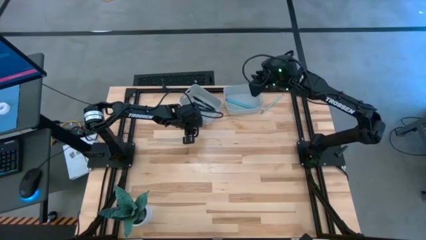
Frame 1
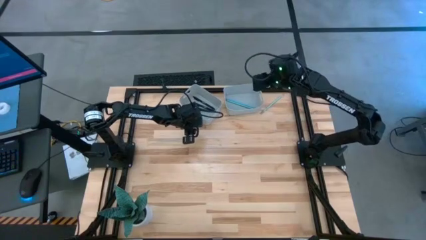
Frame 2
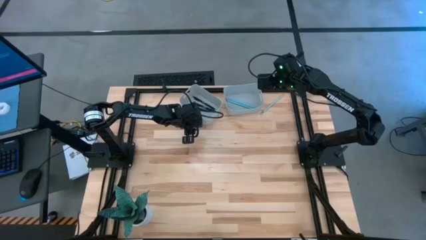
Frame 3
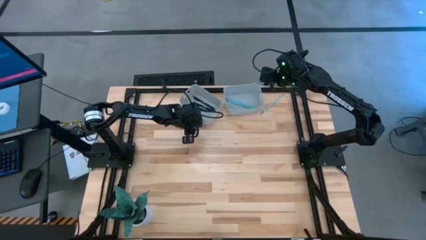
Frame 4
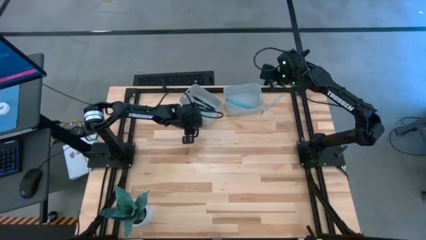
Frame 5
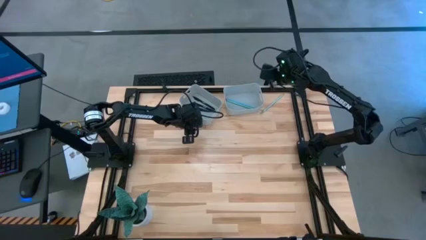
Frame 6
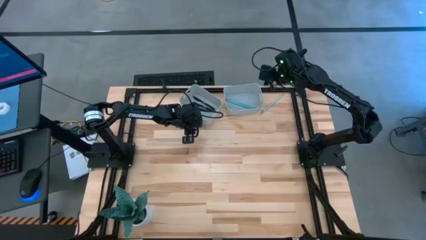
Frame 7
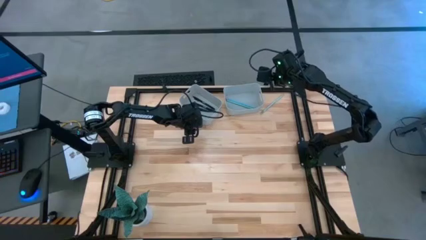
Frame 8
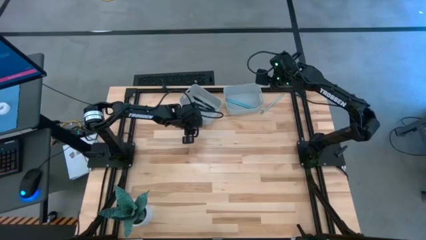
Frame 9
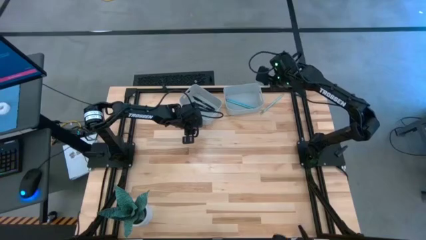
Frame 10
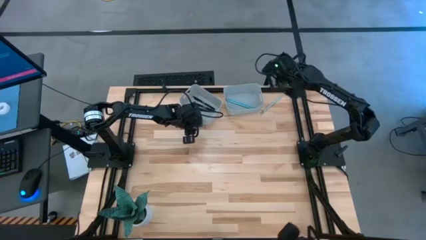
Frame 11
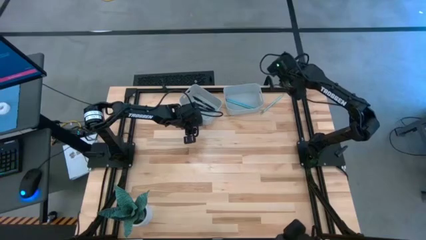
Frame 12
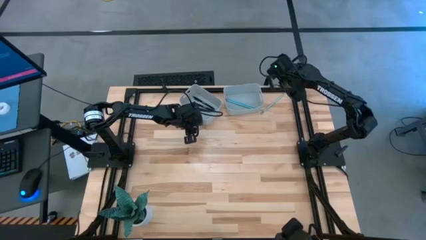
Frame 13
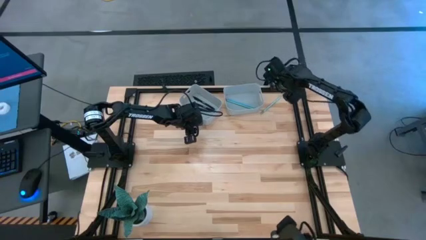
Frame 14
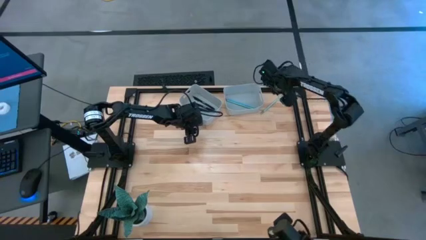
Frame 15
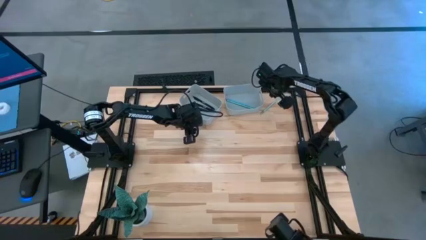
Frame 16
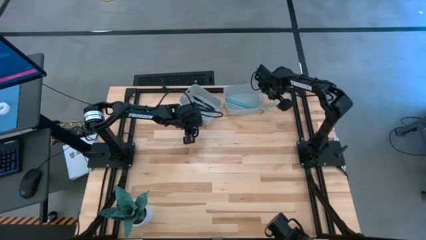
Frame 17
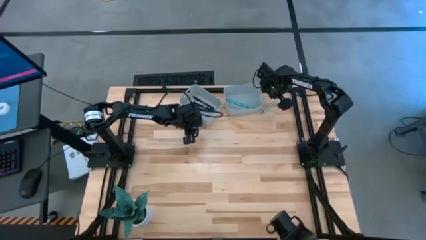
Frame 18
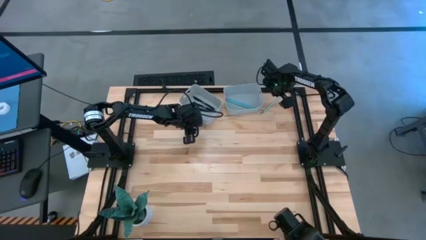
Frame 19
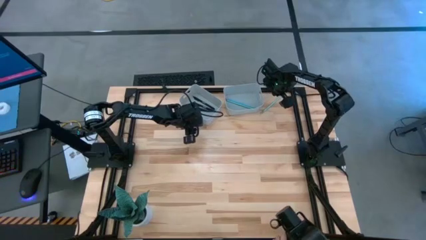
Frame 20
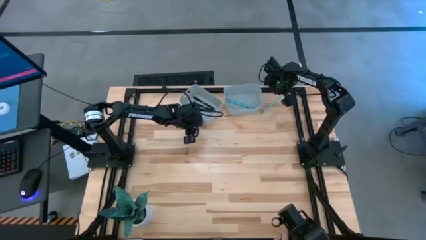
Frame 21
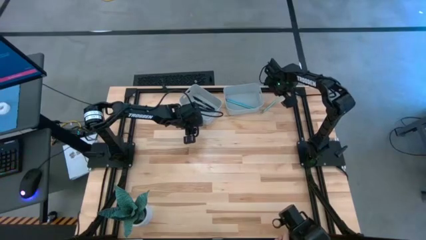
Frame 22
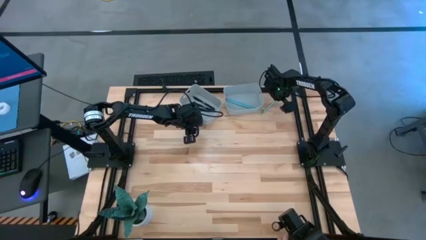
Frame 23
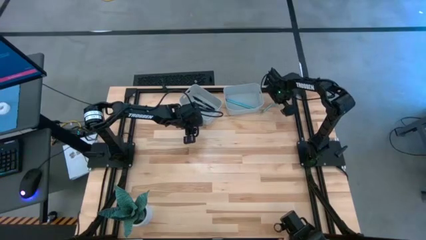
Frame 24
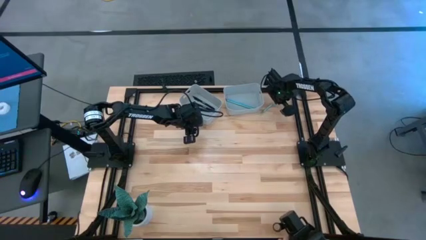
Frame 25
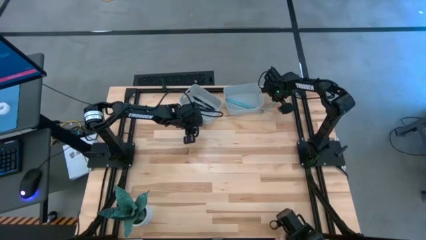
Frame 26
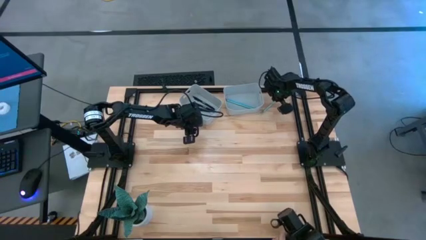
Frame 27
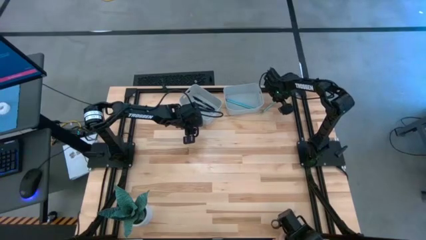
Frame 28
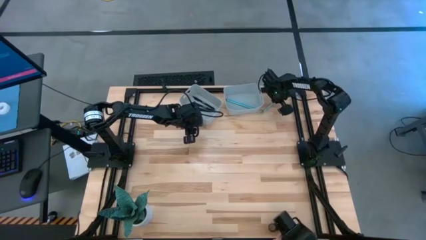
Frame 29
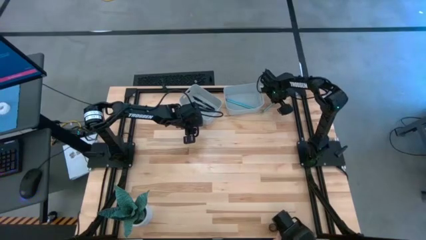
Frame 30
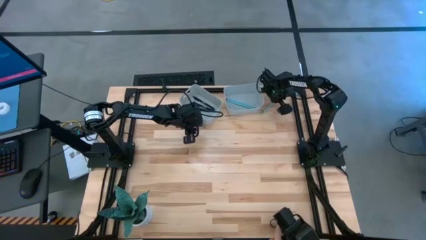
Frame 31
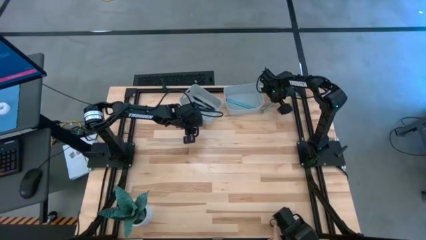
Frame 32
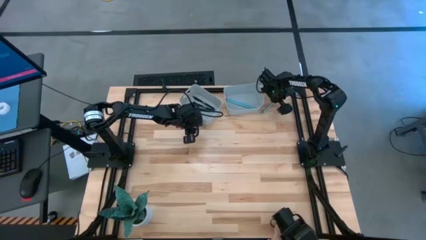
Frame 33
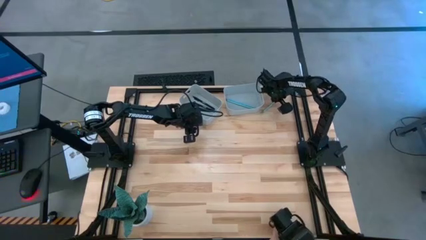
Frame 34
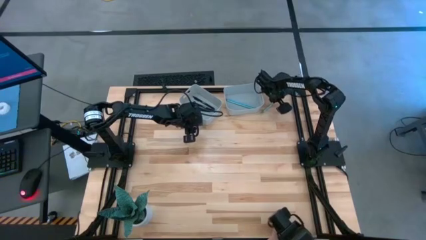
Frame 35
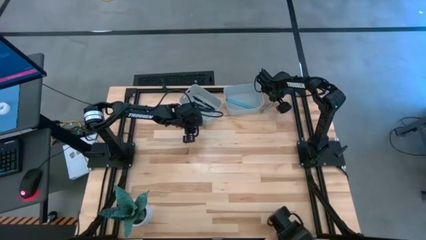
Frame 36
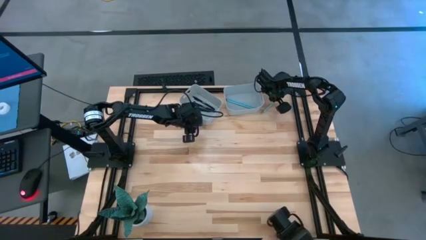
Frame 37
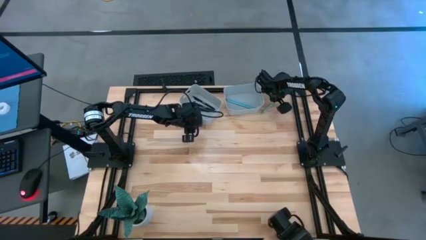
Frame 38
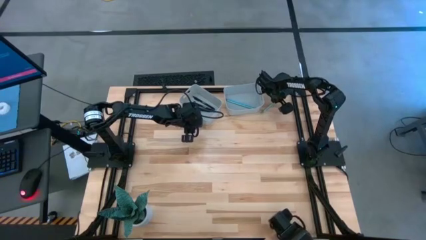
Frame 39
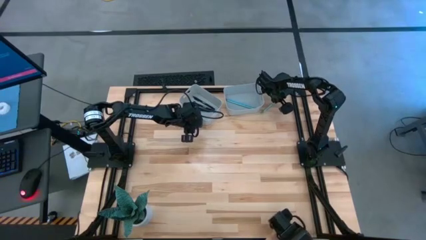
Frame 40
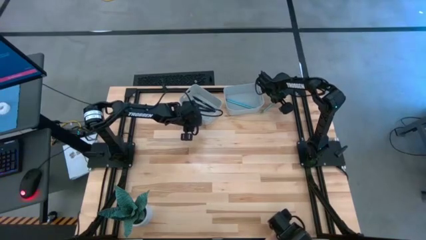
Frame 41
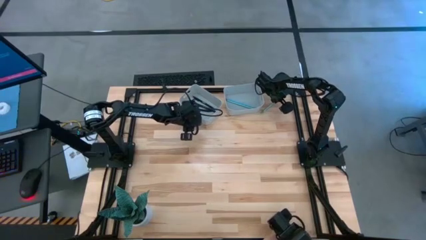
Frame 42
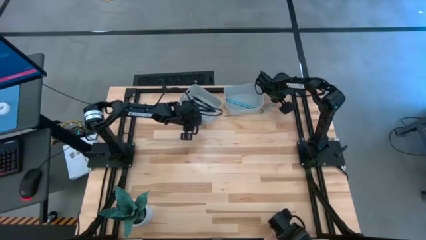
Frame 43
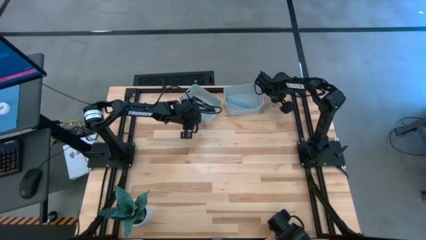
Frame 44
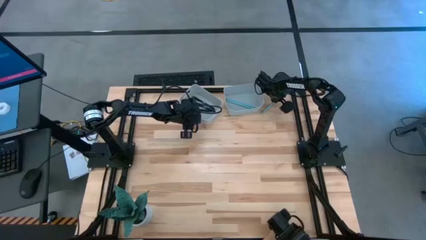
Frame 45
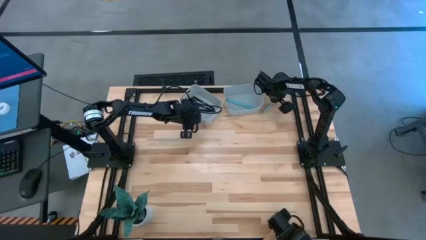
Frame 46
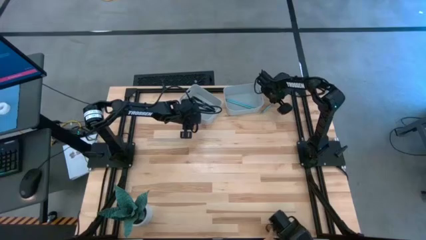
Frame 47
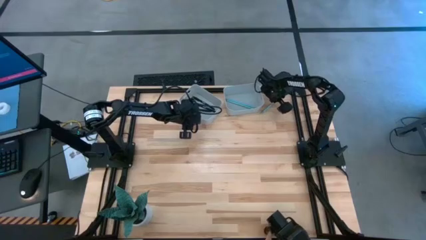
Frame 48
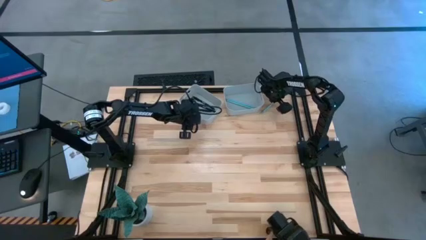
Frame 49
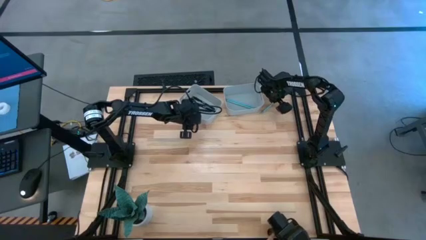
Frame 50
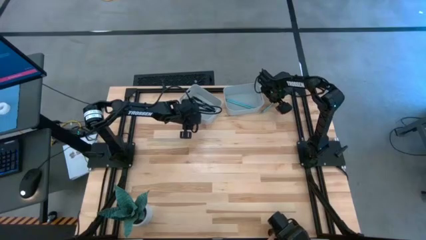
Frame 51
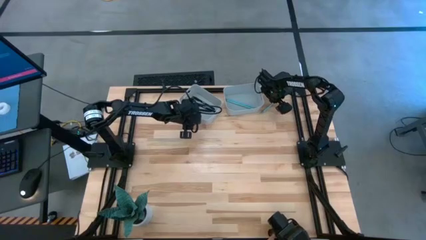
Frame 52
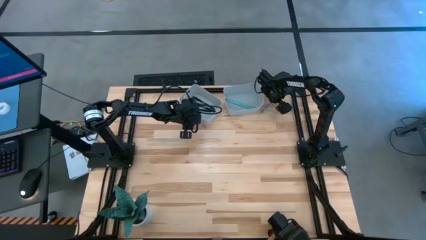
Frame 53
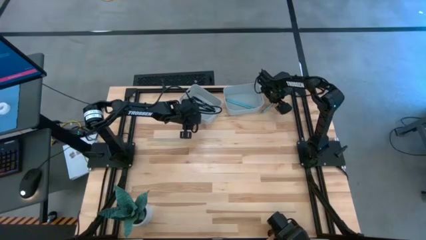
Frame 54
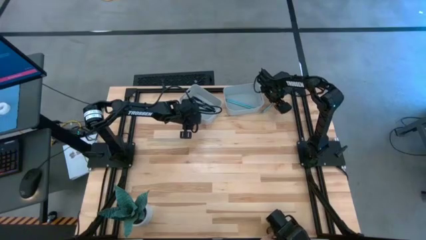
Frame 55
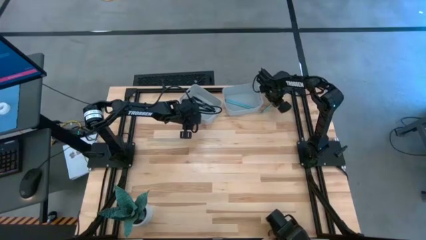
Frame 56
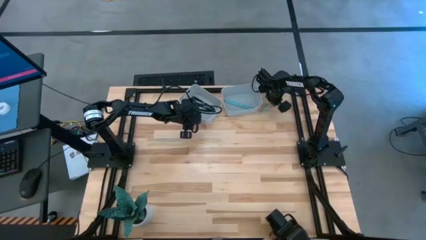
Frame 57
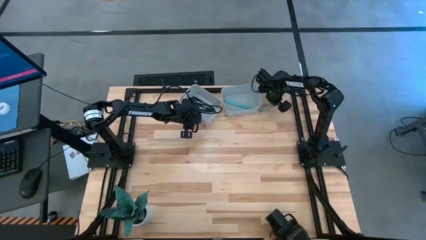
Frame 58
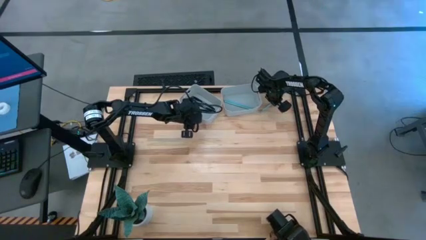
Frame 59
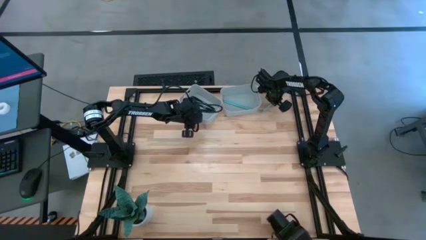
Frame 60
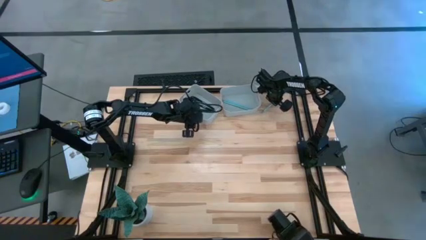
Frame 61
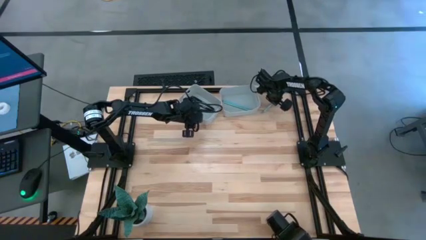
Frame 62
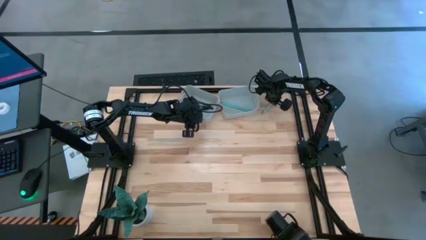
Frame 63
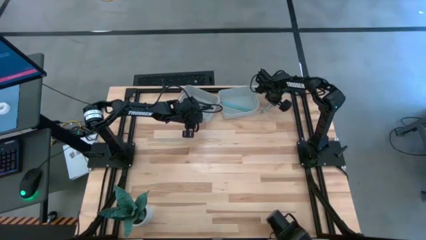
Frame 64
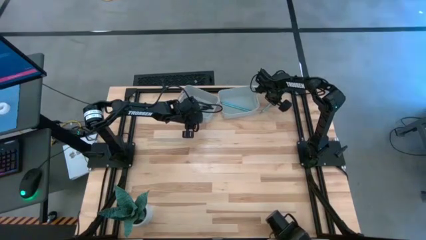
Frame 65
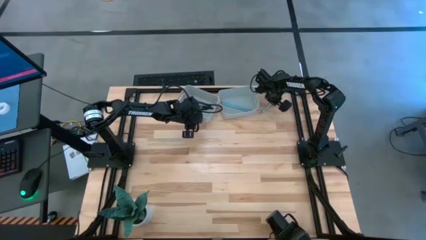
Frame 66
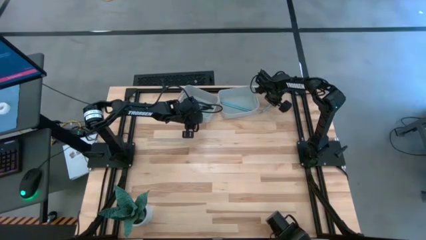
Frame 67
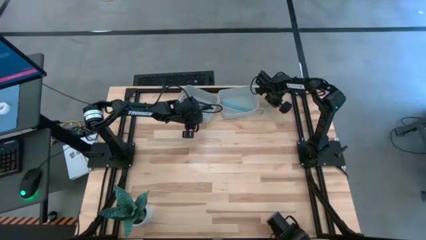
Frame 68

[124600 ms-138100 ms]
Task: Sort pens & pencils
Put the light green pencil into the right gray bin

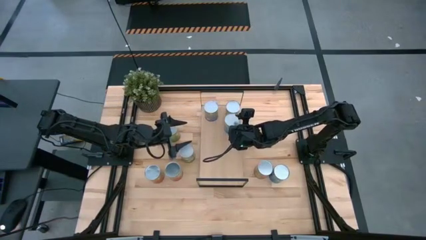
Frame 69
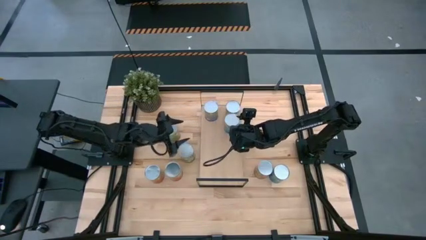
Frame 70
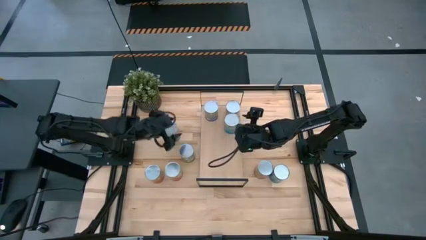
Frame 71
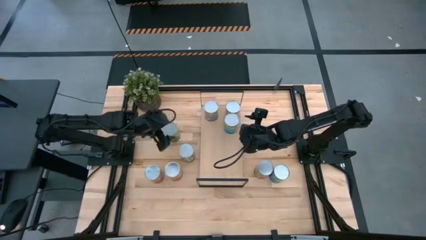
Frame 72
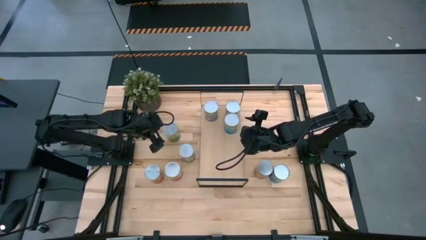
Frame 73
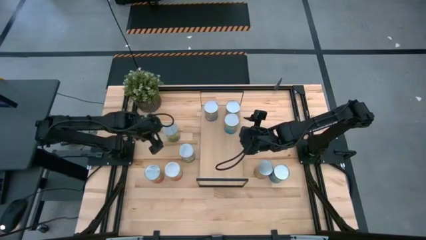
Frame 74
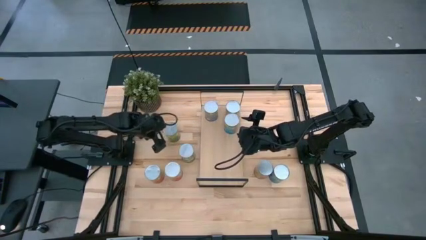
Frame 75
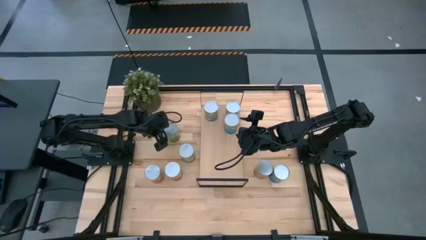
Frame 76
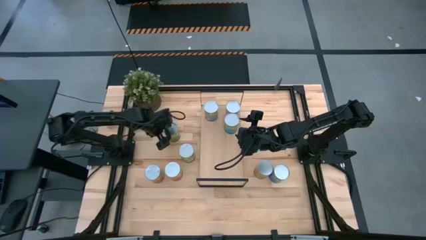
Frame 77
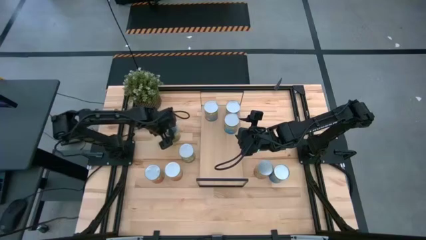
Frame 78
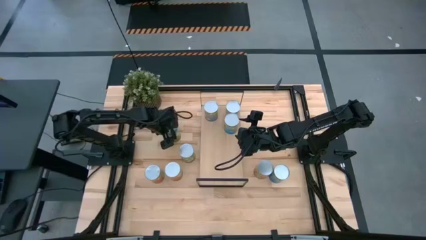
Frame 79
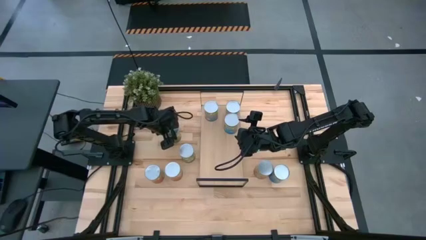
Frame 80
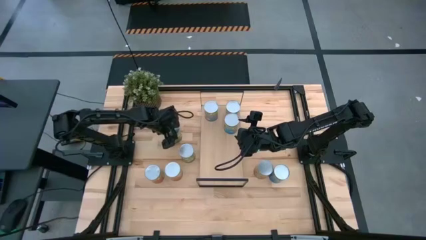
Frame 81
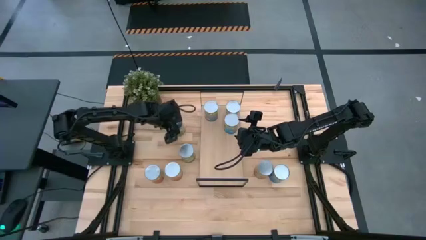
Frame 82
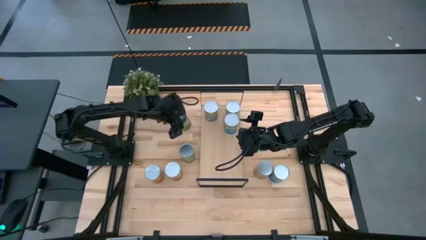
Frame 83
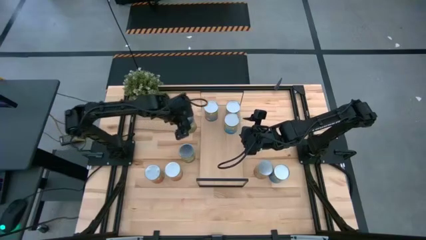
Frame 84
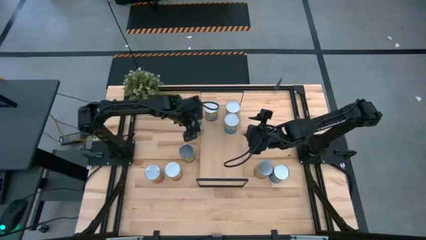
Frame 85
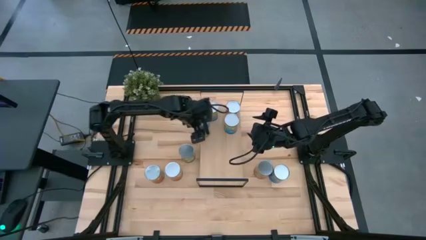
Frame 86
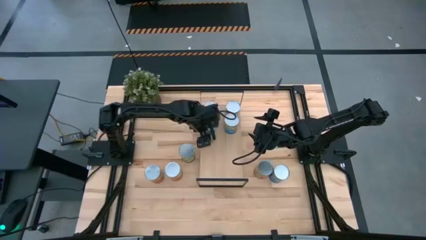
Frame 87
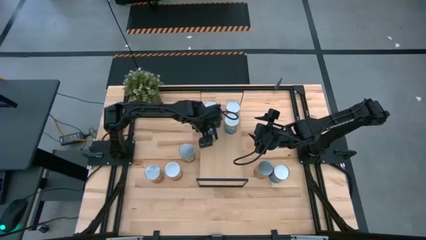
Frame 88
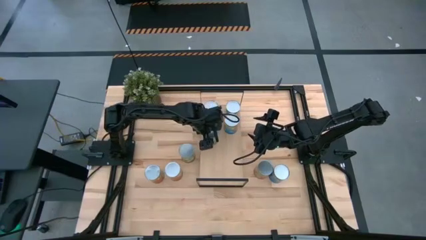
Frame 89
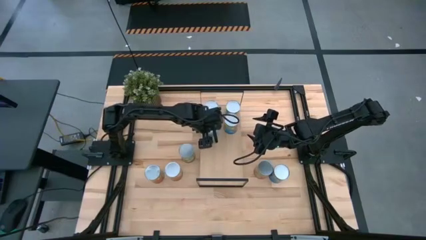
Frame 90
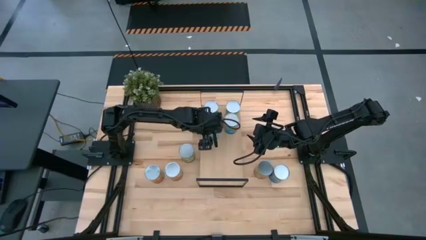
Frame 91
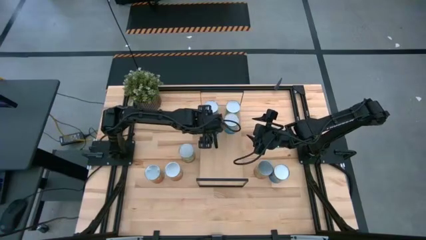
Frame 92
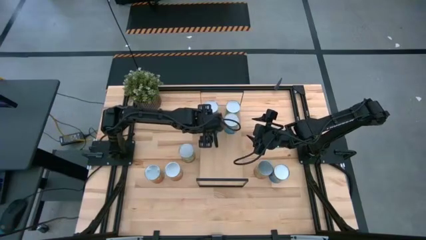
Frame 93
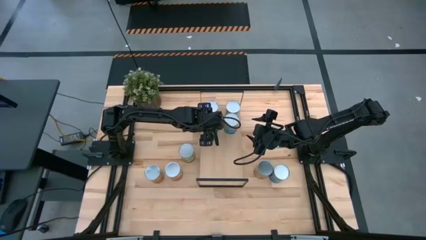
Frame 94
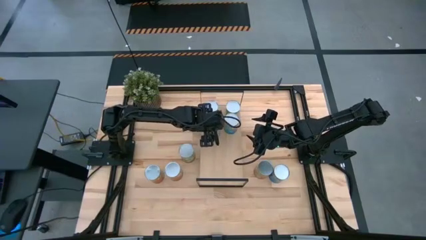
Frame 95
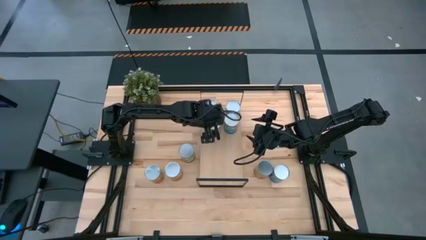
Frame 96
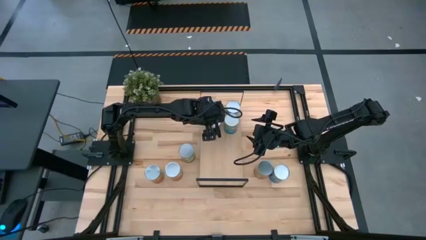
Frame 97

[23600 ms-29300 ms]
Task: Pick and place cans onto a shelf
Put the canned oranges on the shelf
